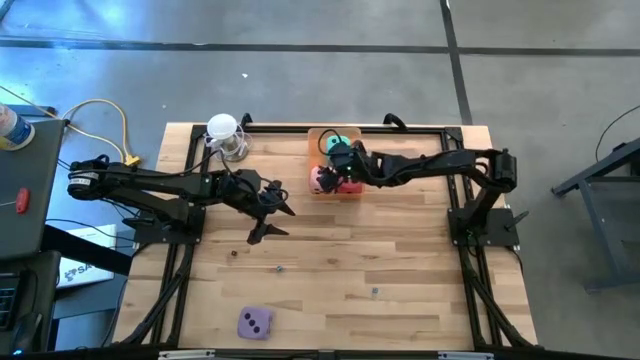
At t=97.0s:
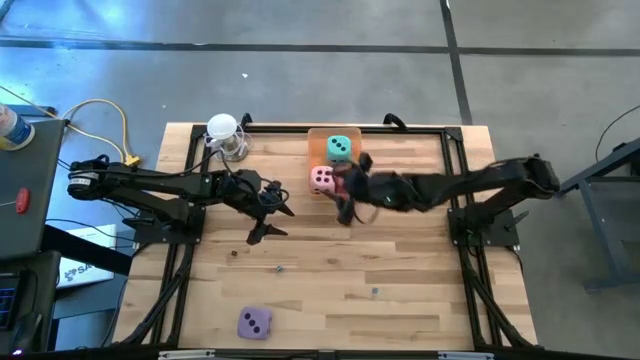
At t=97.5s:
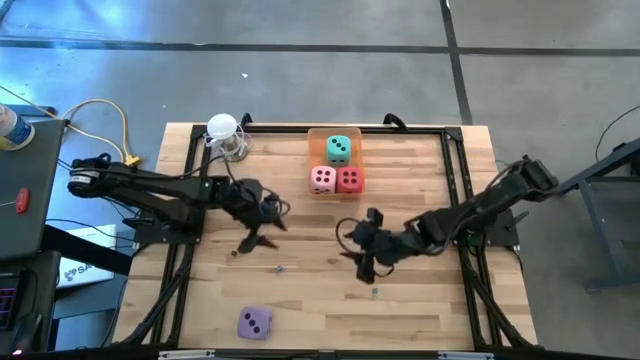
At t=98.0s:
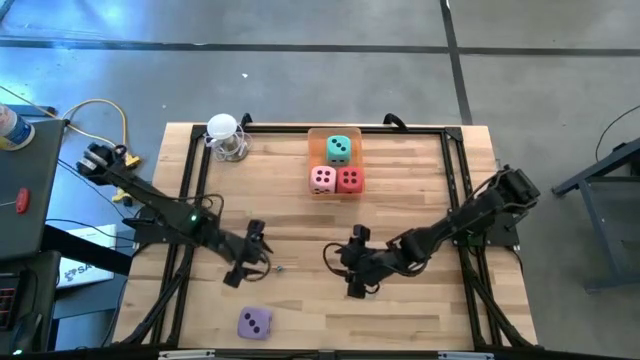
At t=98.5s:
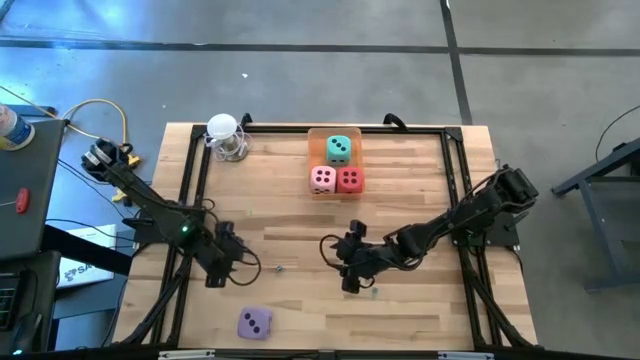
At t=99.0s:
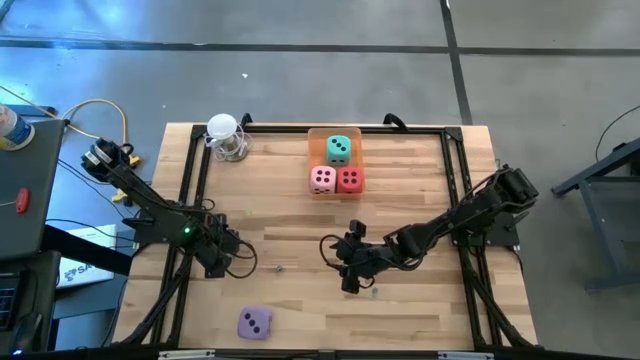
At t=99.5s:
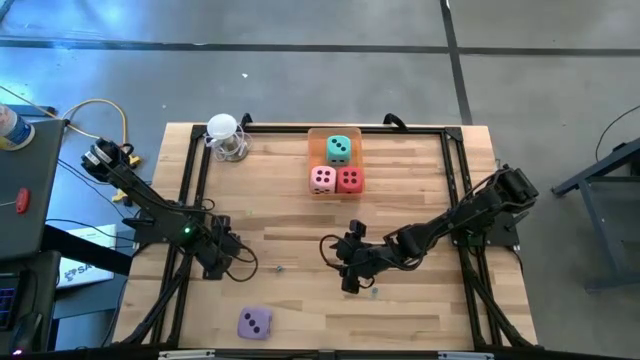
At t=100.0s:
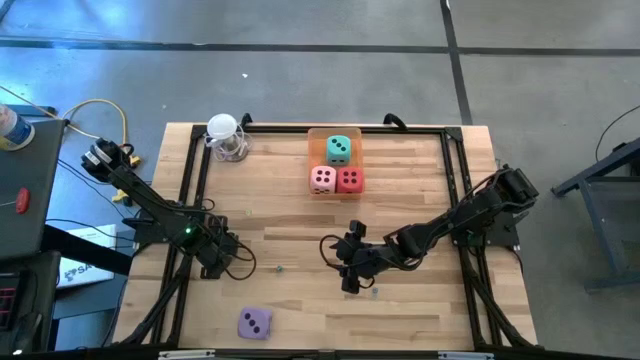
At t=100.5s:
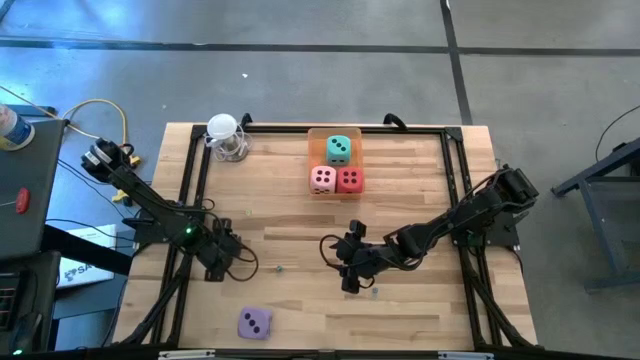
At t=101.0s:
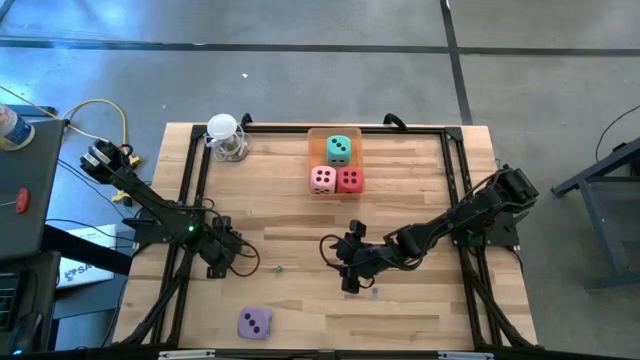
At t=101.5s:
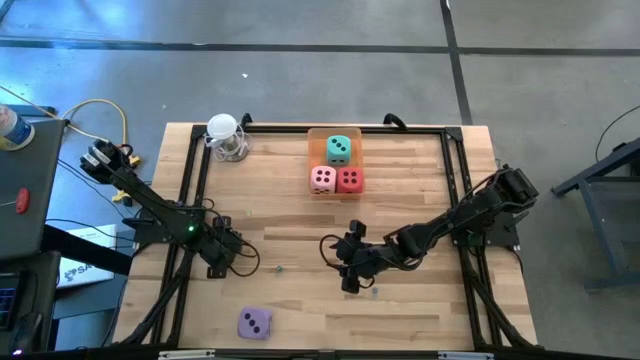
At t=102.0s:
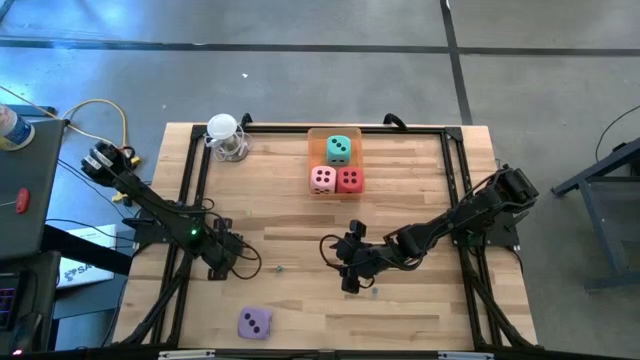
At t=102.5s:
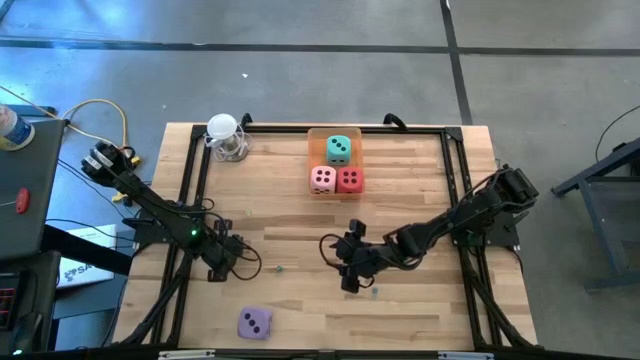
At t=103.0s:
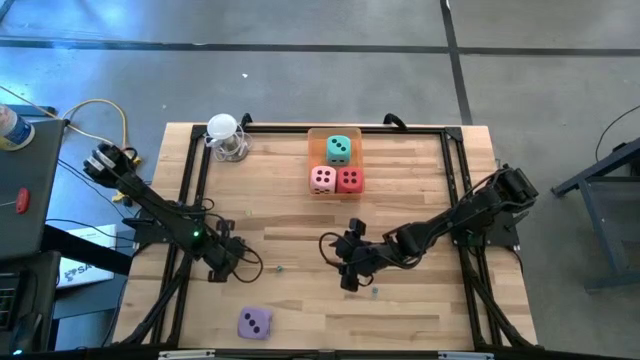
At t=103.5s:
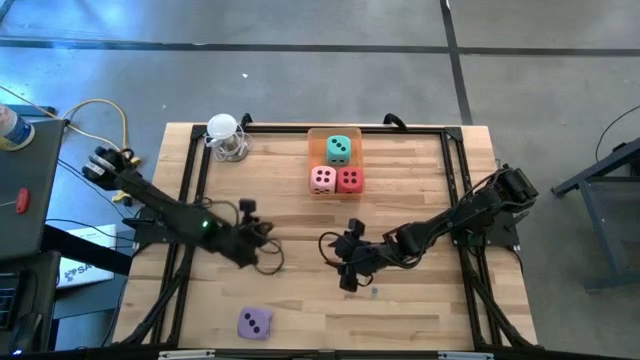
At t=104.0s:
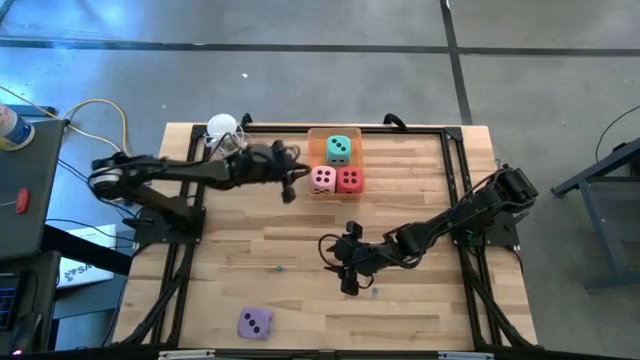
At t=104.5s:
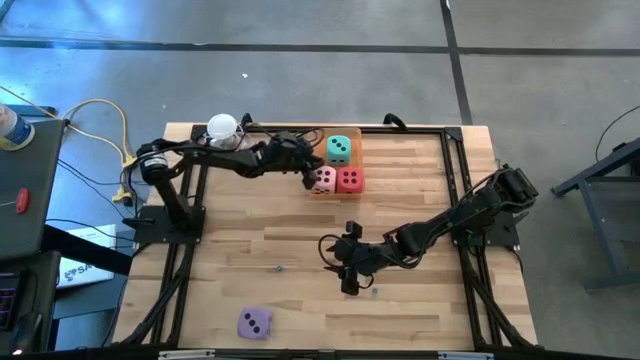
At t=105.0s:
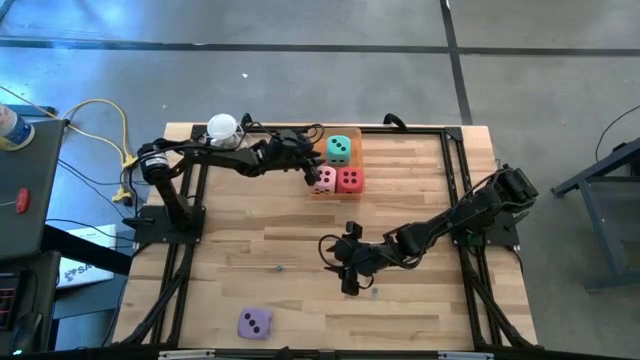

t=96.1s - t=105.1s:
Task: Pick & Place Dice
Put the black die into the orange bin

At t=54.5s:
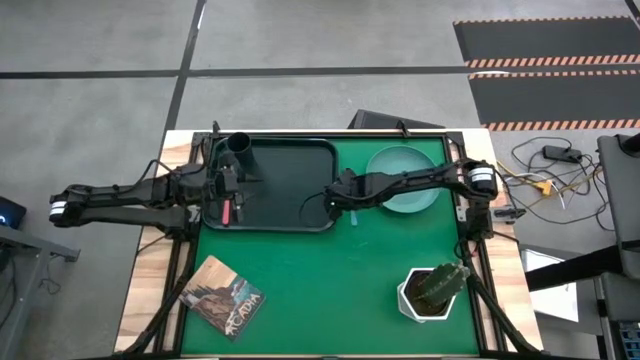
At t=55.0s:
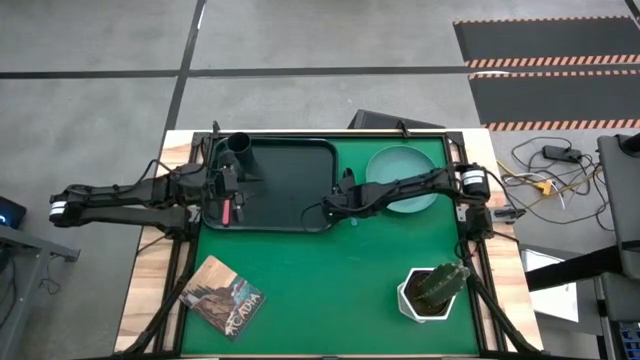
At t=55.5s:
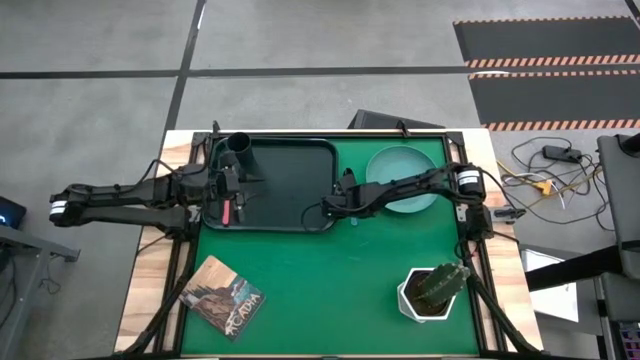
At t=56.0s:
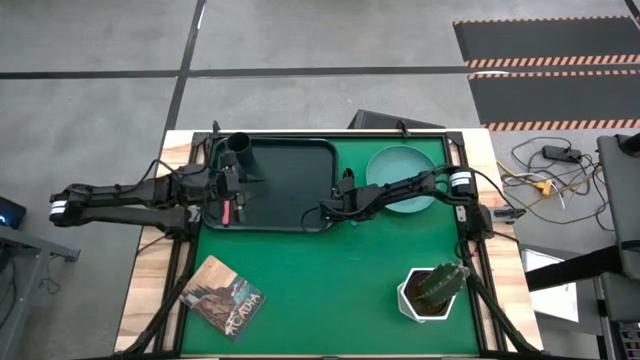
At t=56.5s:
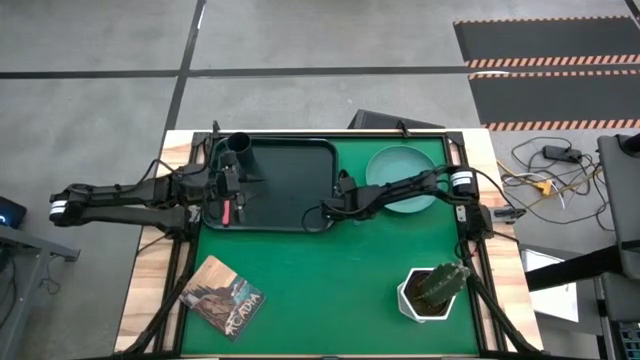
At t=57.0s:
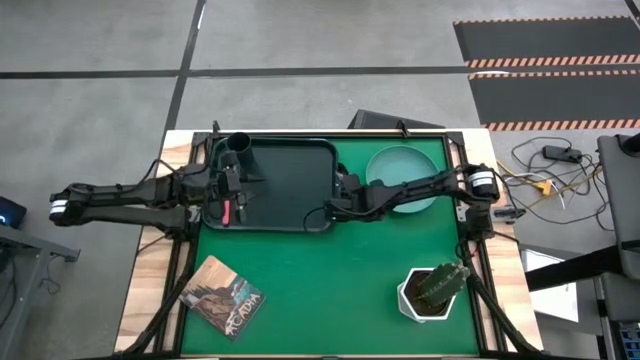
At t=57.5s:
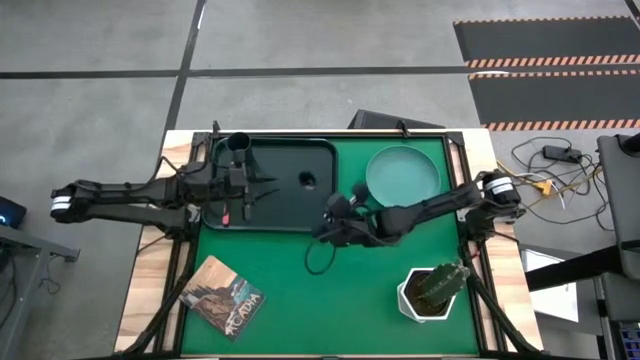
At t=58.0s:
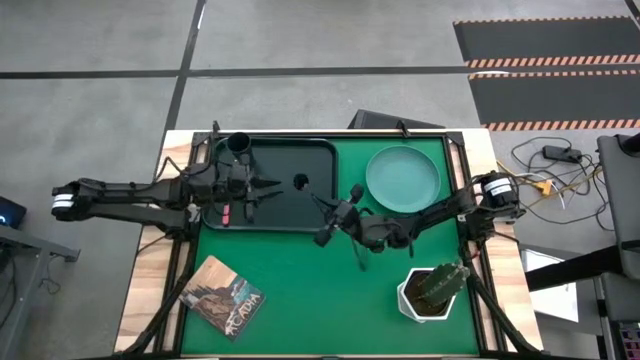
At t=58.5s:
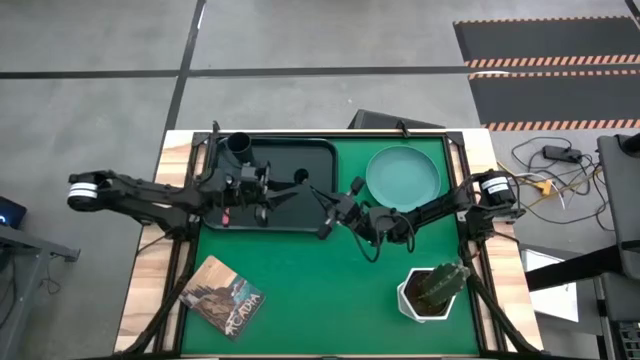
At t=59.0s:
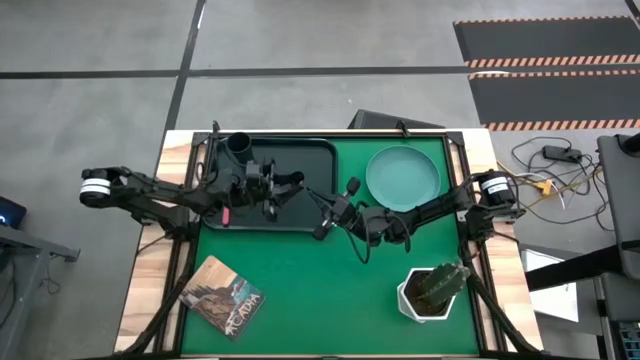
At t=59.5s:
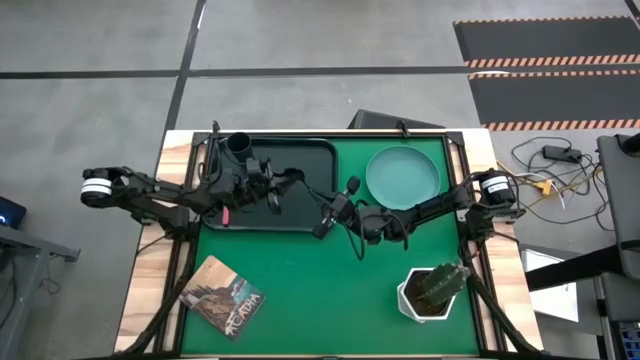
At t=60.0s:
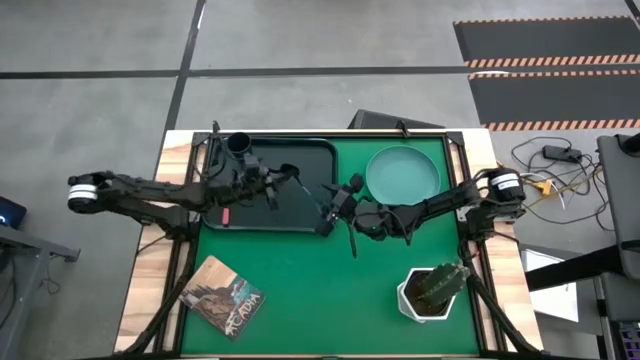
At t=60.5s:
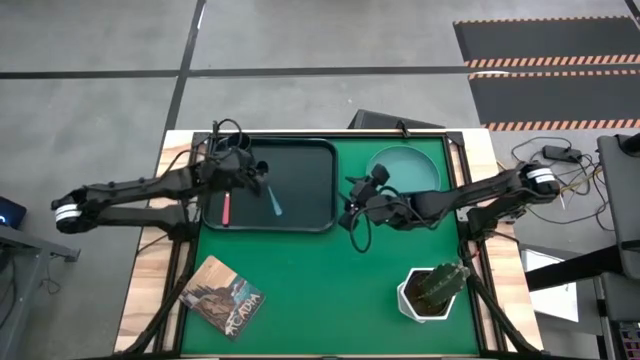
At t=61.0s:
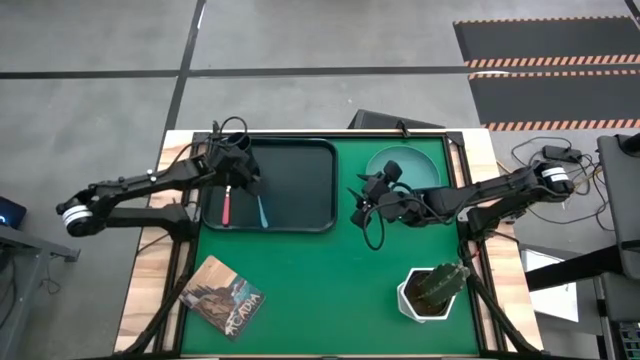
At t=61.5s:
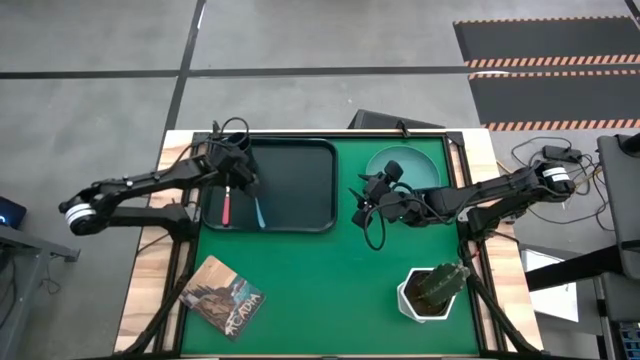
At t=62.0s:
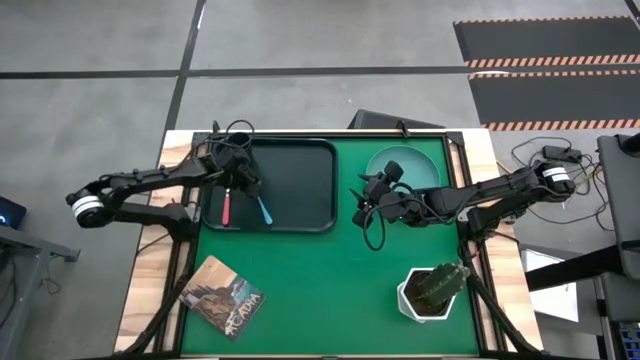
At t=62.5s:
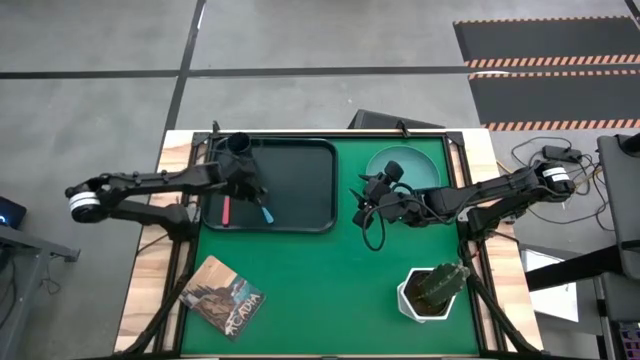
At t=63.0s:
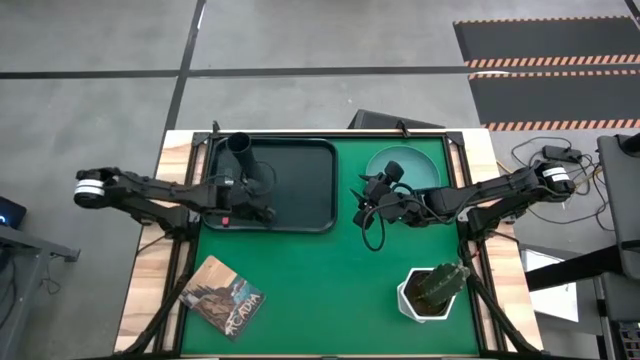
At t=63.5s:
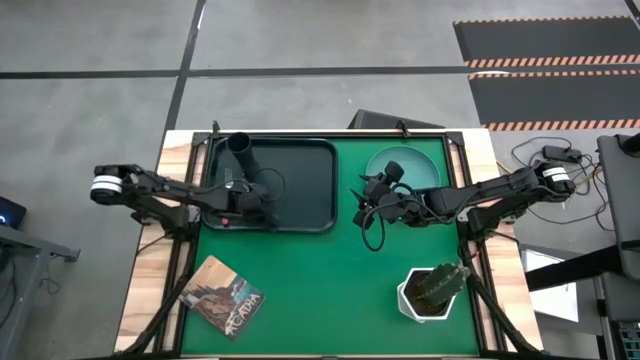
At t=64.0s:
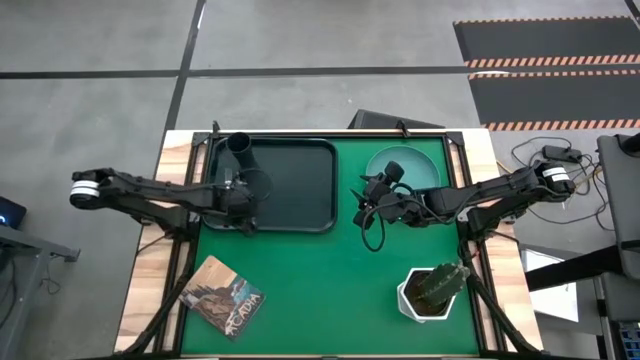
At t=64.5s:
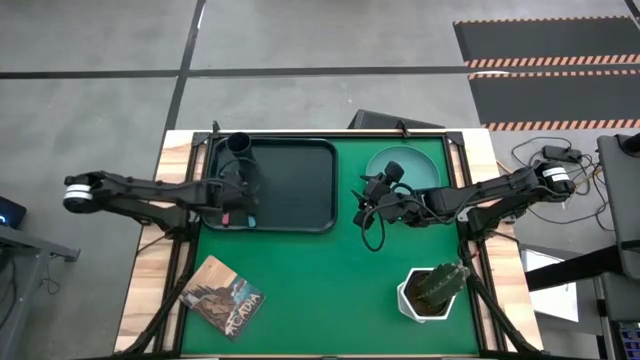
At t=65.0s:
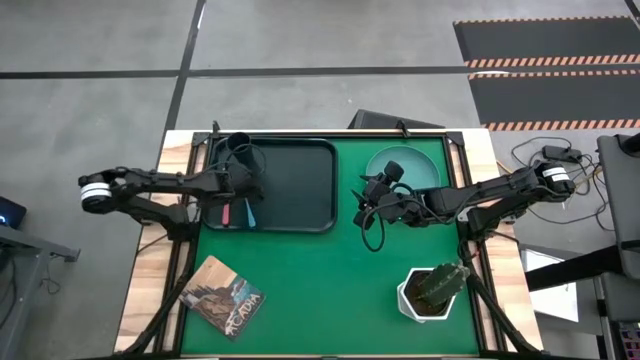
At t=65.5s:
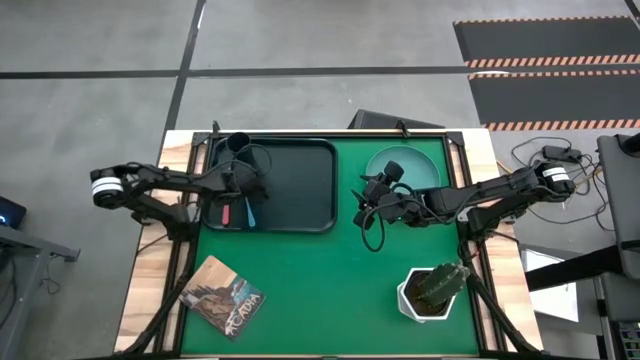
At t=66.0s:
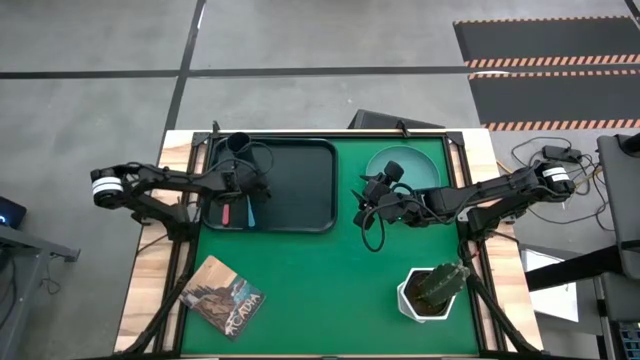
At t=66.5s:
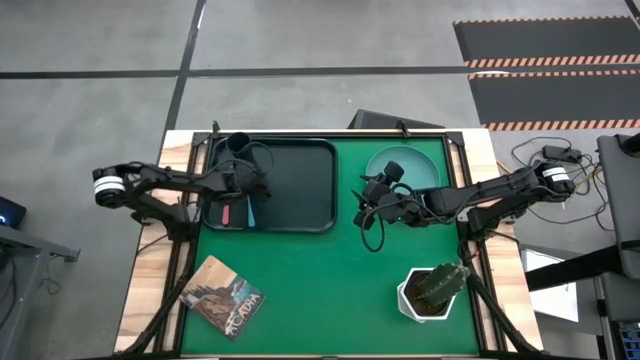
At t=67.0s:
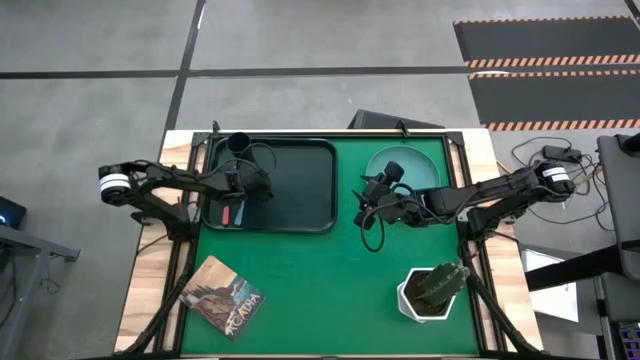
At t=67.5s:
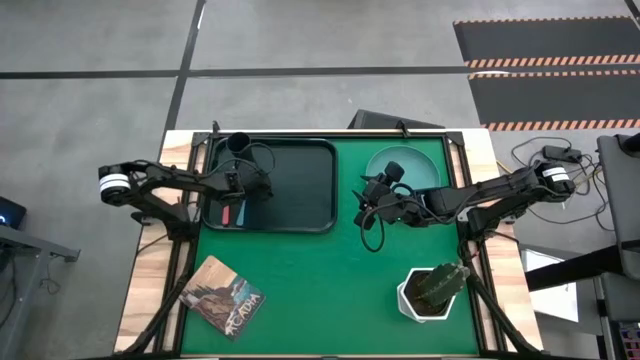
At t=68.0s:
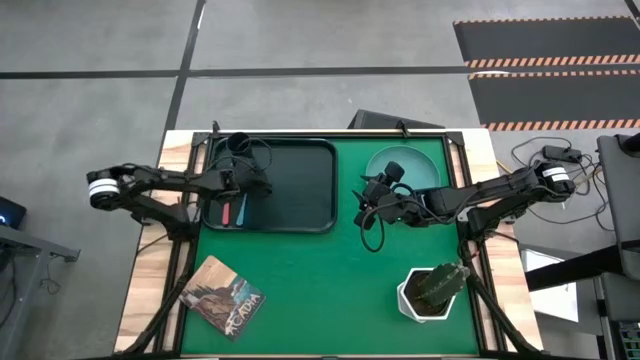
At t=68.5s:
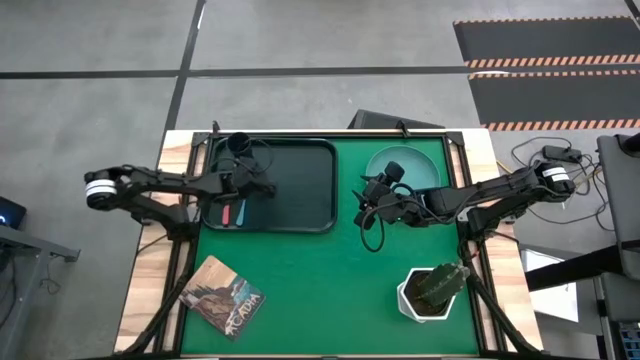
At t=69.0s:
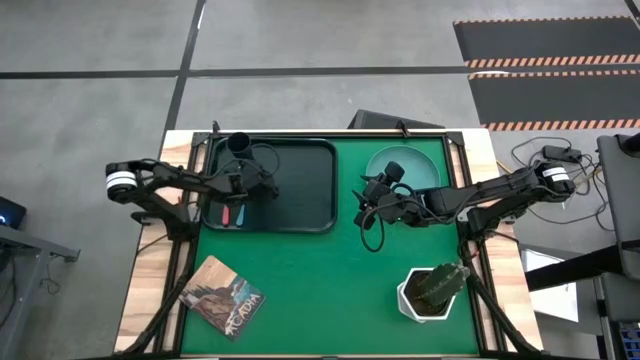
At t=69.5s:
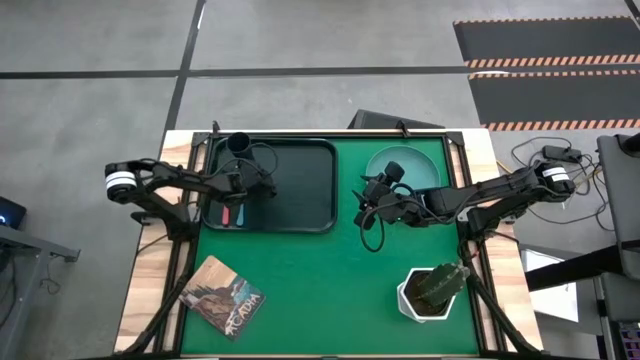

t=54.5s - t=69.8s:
Task: Pick and place plate/cup/fork/spoon on tray
Put the blue spoon on the black serving tray to the right of the pink fork
